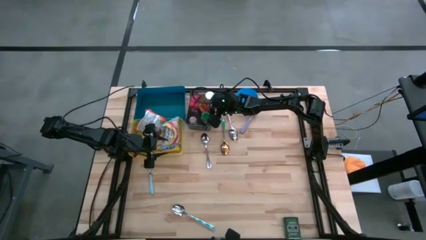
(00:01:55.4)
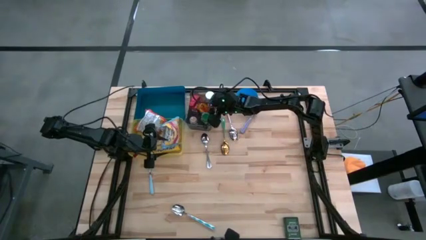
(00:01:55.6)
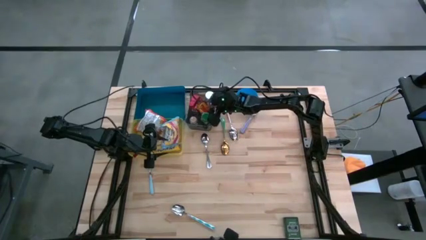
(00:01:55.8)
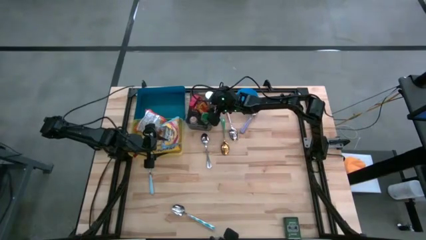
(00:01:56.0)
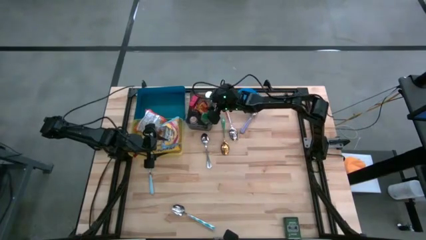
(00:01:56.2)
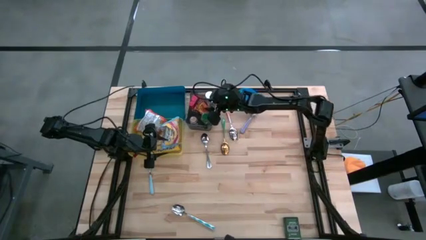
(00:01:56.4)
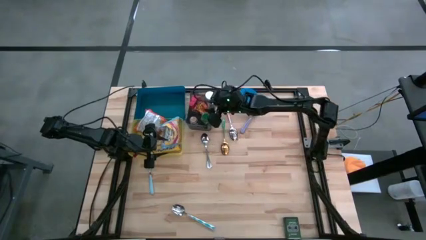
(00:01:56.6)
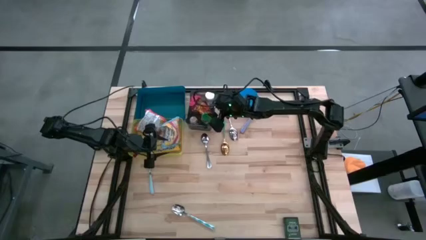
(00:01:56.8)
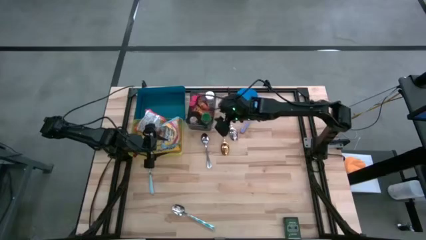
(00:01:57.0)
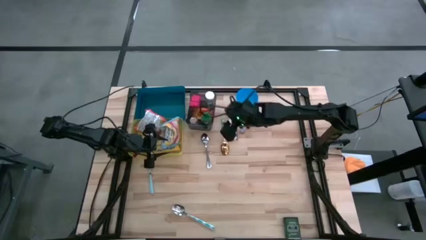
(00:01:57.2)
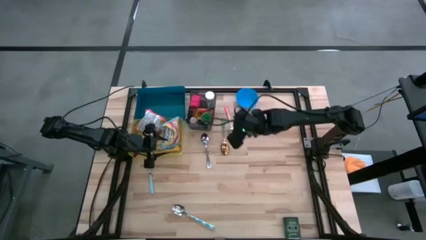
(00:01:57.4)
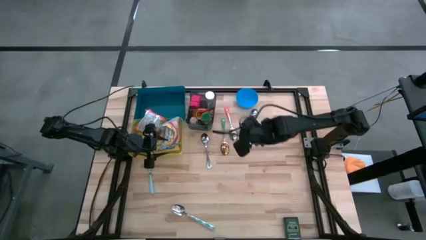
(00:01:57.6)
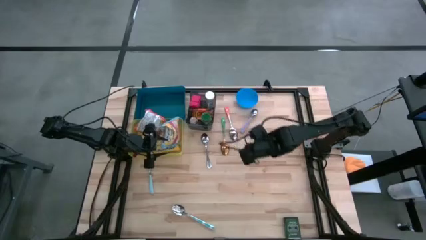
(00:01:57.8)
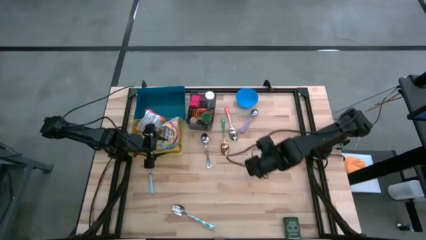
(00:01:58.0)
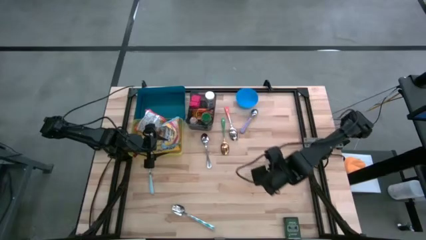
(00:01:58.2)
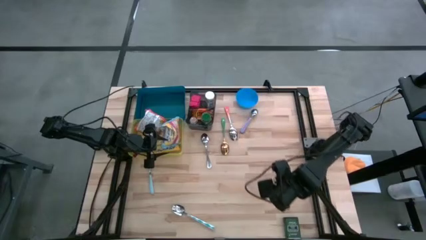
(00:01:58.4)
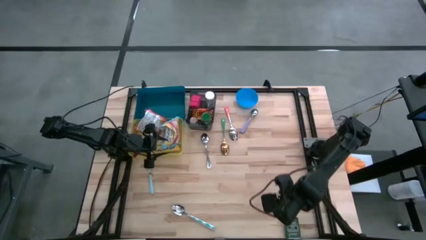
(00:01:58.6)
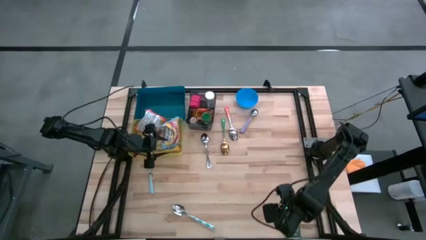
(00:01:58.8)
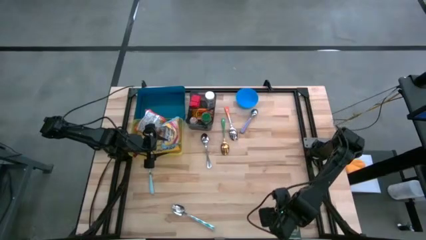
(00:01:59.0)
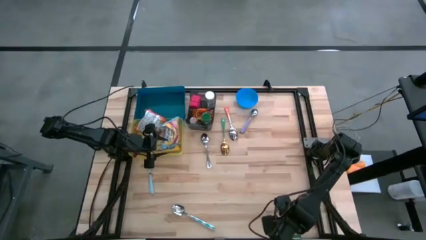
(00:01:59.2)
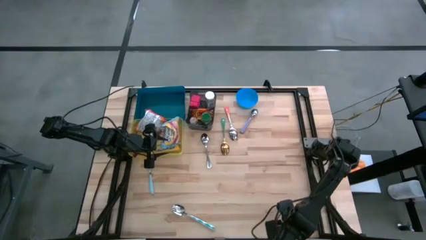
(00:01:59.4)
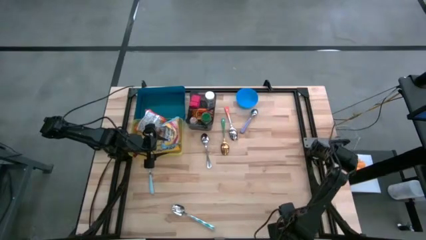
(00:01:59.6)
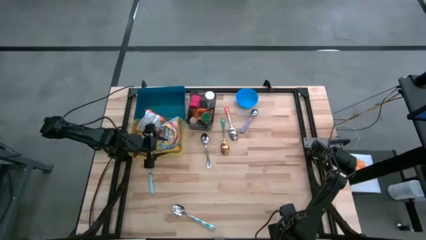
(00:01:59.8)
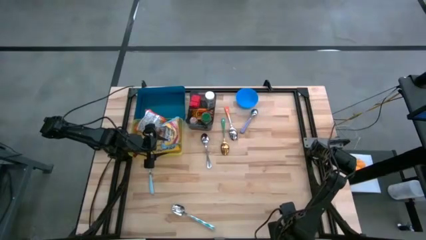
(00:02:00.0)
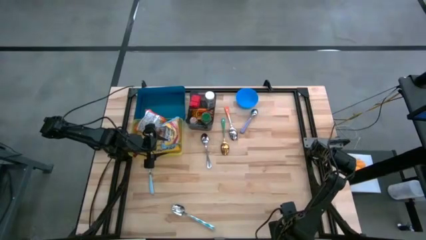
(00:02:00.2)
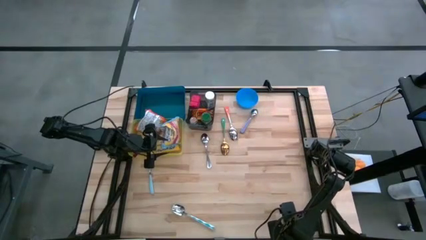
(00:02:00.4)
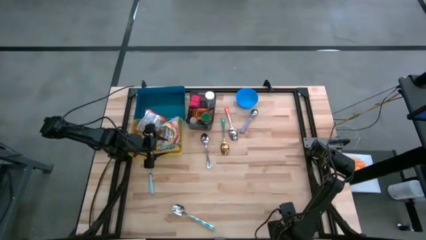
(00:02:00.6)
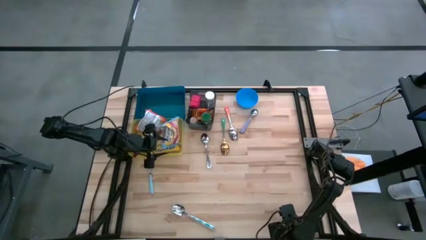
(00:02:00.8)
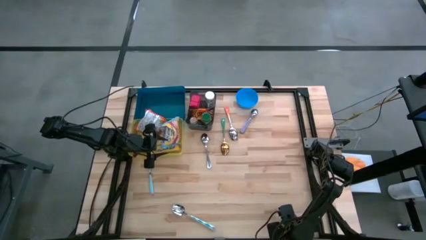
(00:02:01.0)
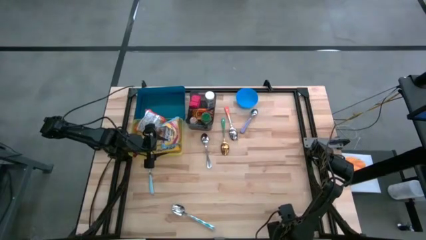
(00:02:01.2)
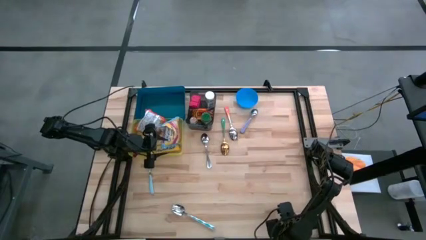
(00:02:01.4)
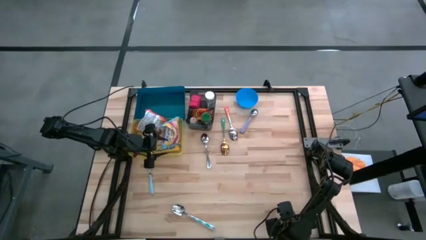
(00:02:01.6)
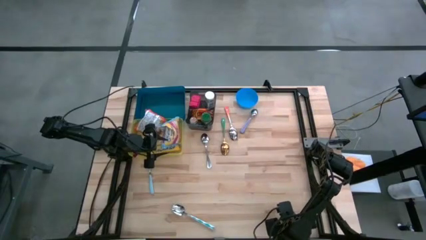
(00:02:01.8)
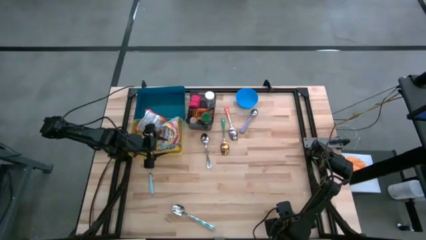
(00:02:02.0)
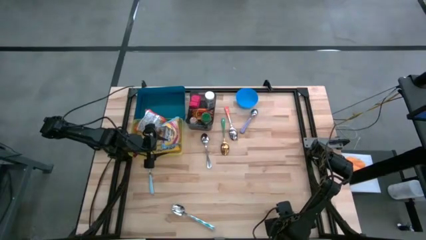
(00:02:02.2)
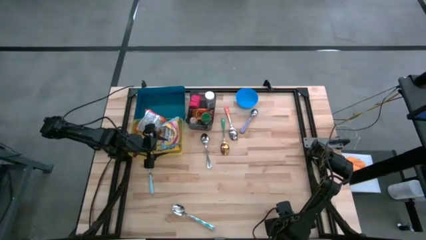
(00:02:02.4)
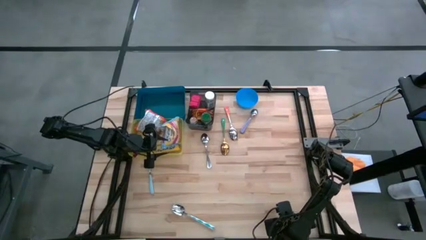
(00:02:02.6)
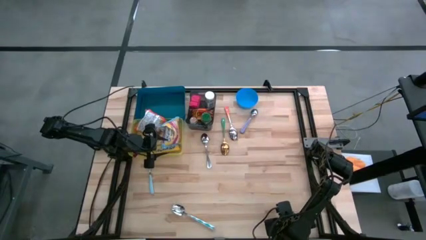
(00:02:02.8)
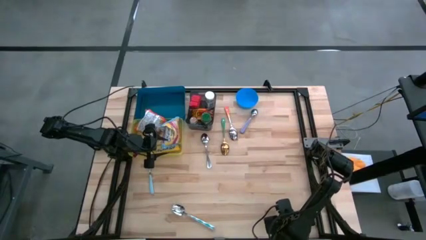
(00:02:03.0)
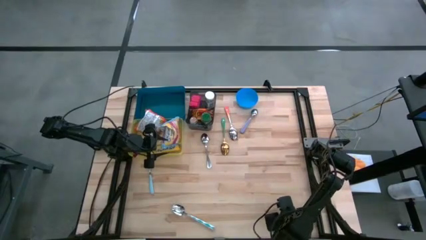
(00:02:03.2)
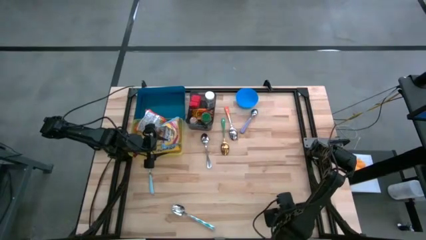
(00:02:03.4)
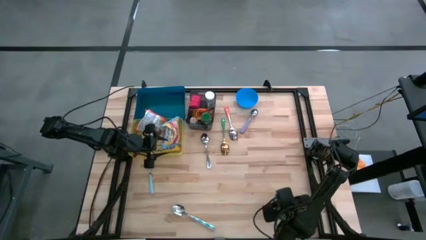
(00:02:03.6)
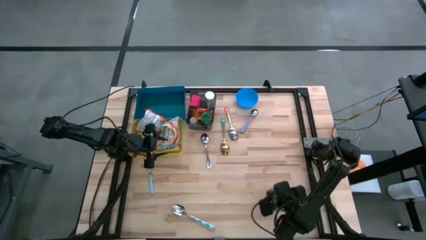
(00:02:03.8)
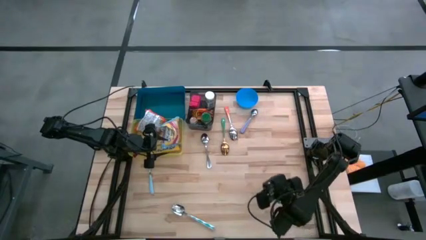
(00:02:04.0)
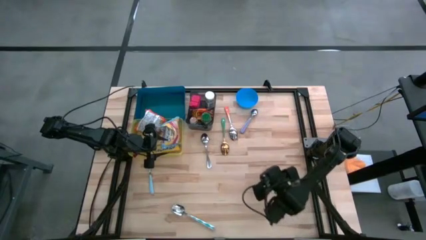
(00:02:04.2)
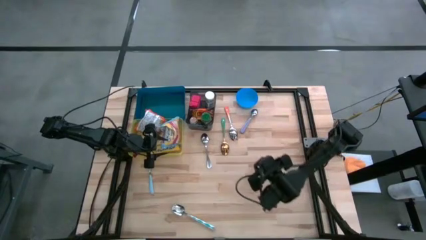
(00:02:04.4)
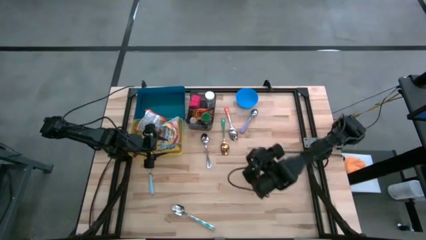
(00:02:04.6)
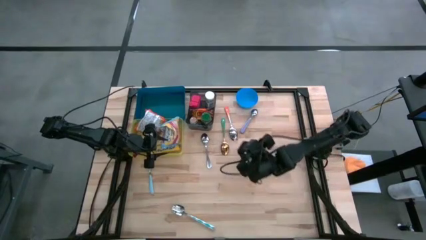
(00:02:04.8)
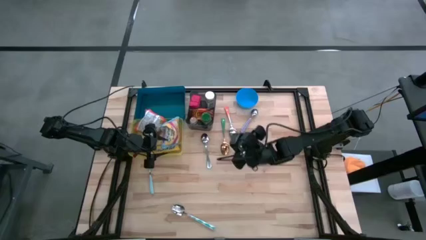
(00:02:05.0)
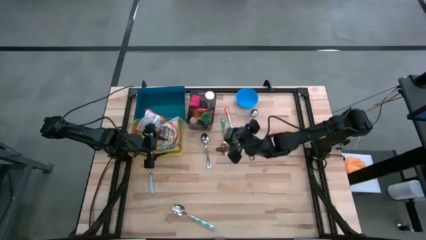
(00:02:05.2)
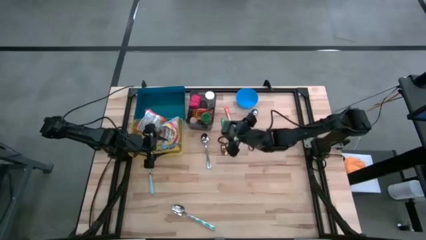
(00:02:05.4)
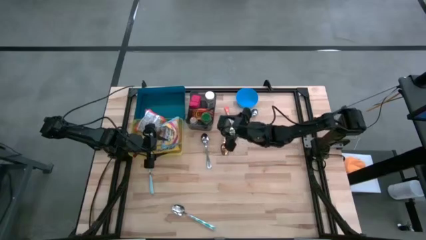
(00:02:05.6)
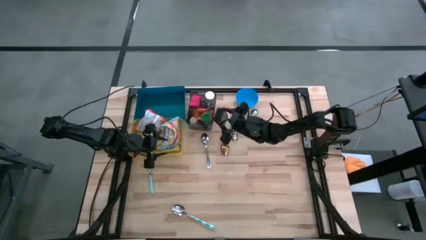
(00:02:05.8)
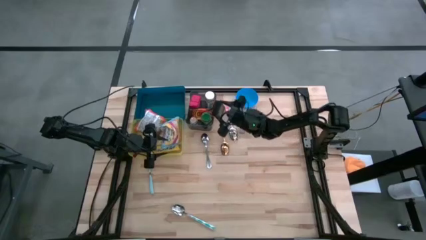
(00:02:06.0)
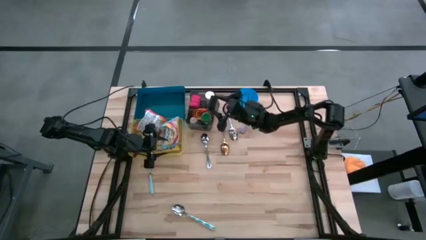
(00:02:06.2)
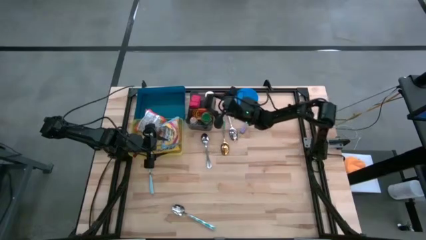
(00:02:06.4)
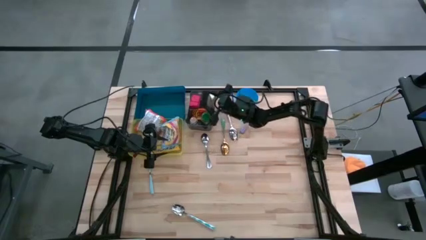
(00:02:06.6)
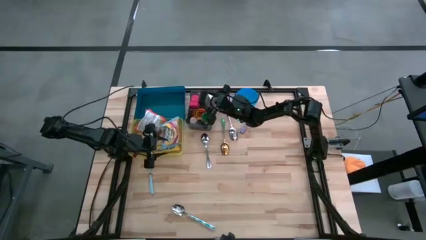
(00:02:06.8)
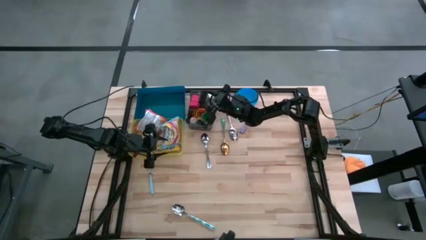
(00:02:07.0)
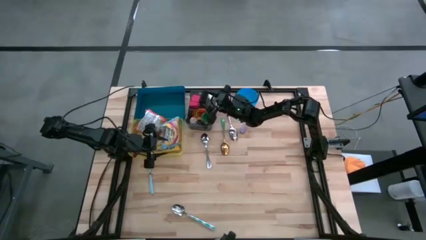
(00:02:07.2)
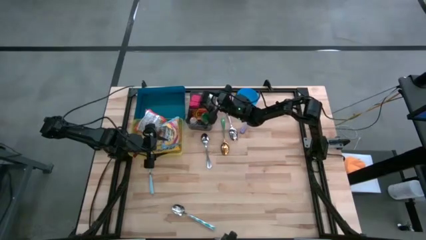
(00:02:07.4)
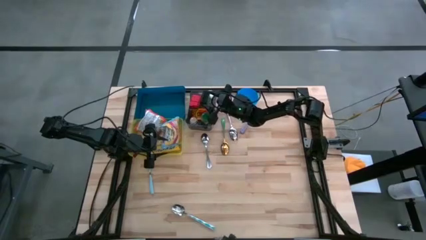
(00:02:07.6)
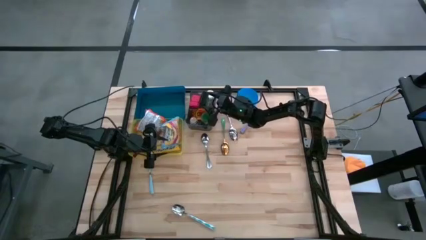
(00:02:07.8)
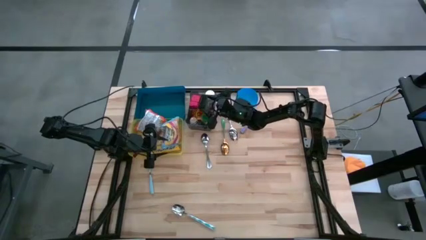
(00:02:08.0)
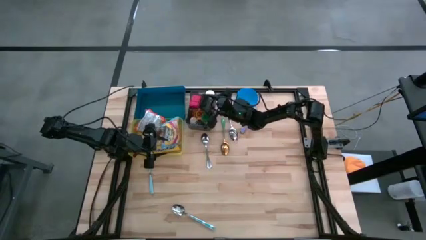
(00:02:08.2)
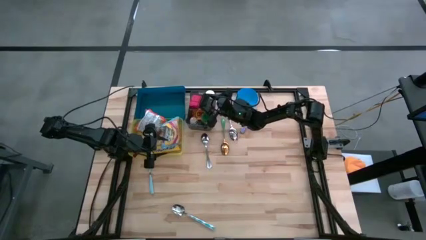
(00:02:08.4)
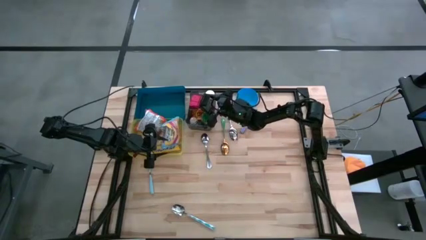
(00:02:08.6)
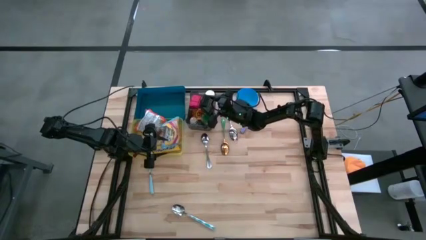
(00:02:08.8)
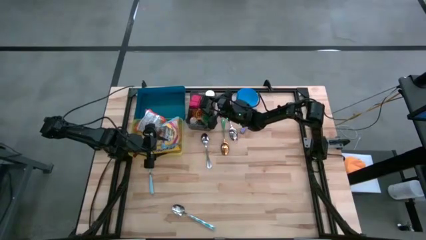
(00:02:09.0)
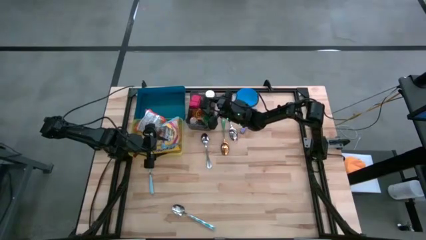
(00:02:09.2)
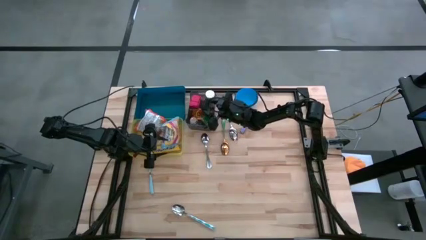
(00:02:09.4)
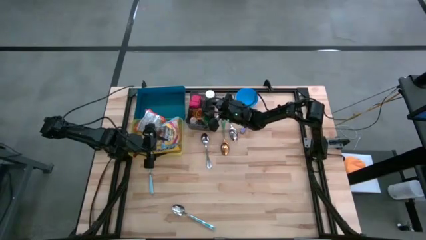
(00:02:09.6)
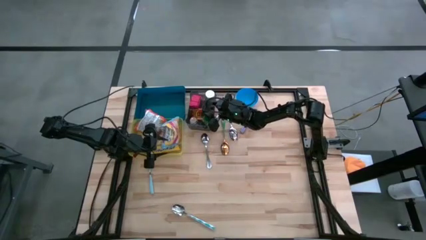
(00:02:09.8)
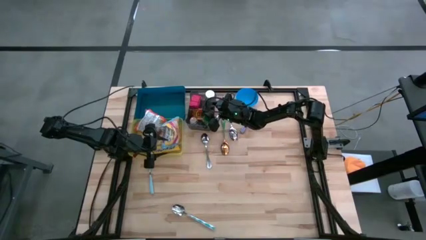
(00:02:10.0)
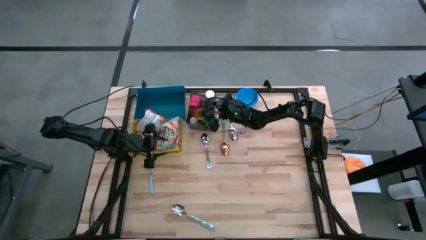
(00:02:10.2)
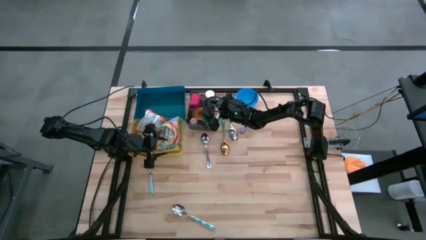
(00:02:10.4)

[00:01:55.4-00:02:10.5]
Put the green seasoning can into the black bin
